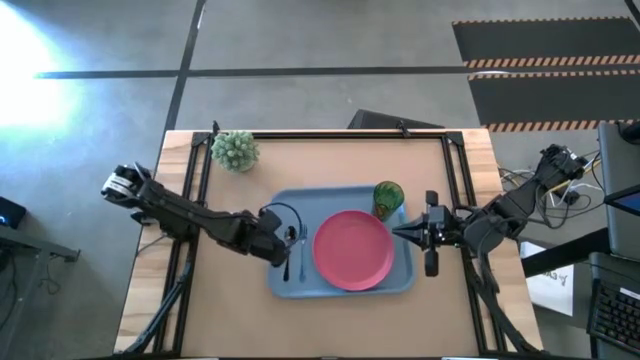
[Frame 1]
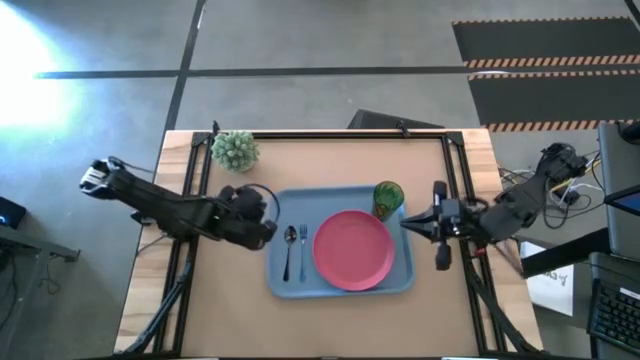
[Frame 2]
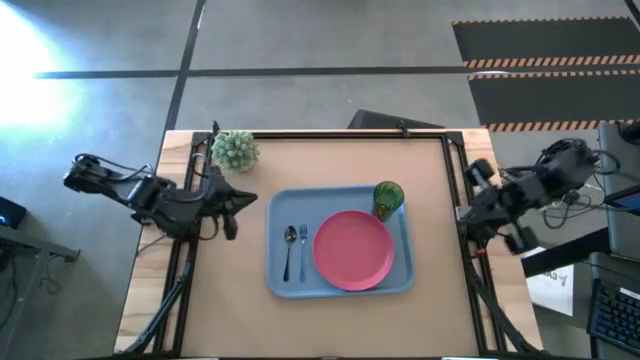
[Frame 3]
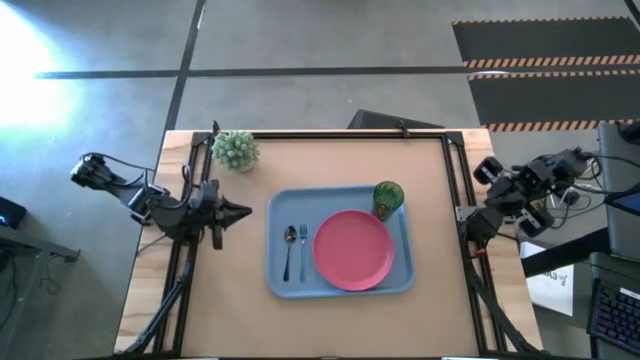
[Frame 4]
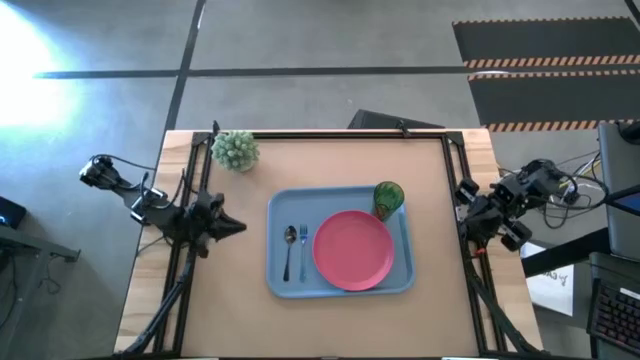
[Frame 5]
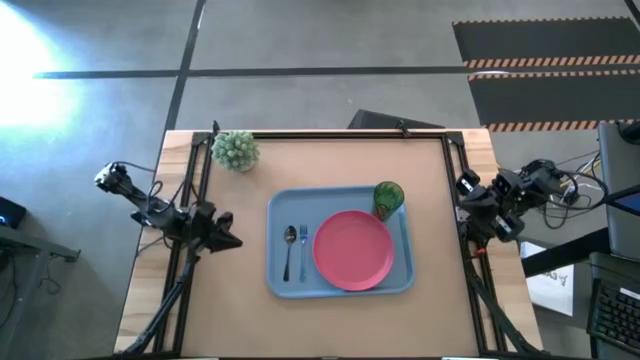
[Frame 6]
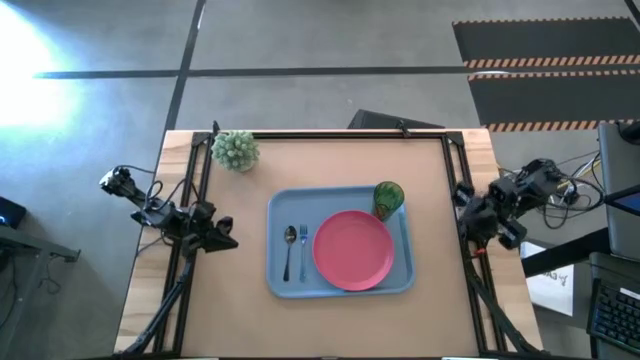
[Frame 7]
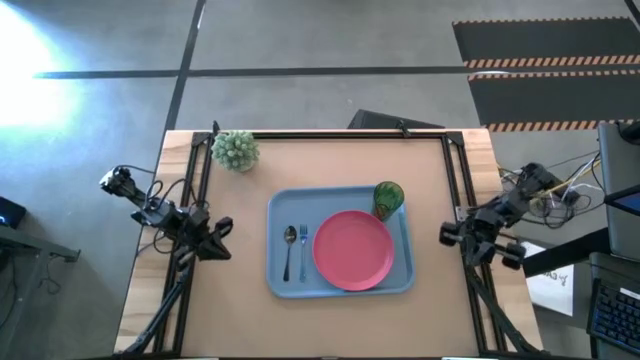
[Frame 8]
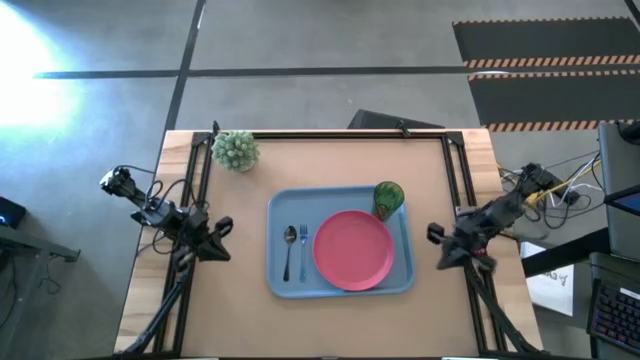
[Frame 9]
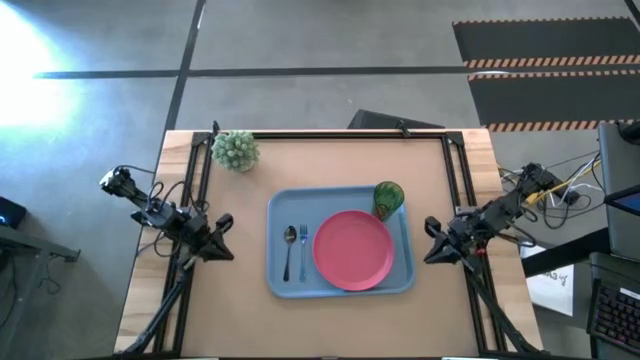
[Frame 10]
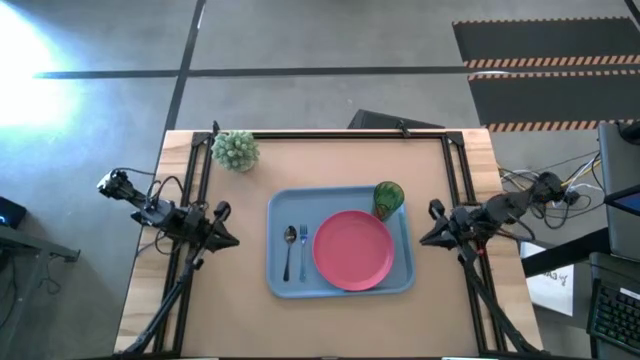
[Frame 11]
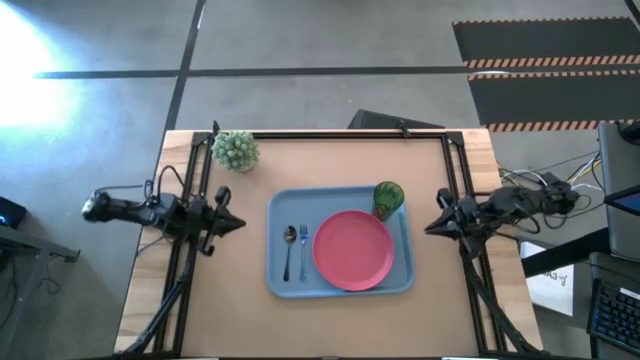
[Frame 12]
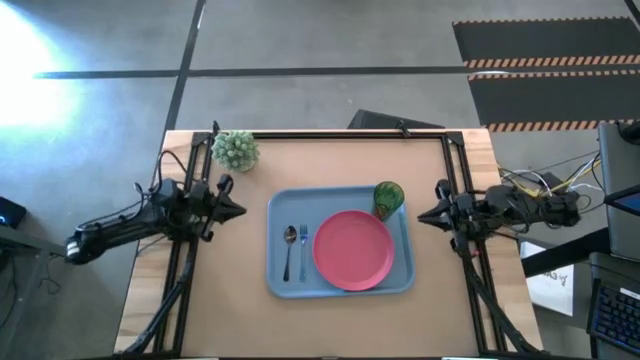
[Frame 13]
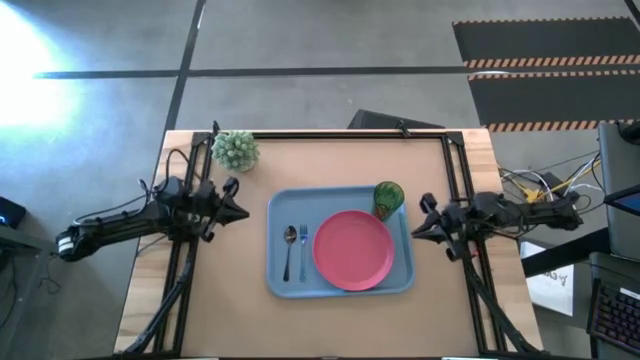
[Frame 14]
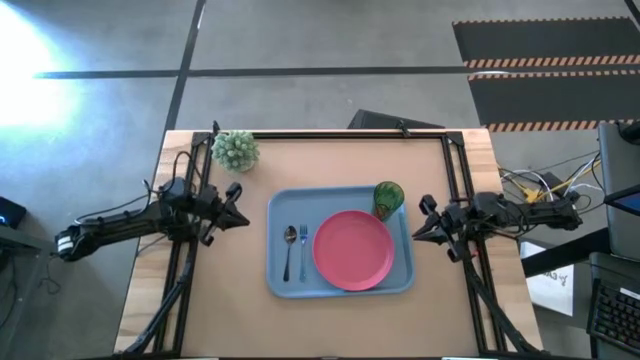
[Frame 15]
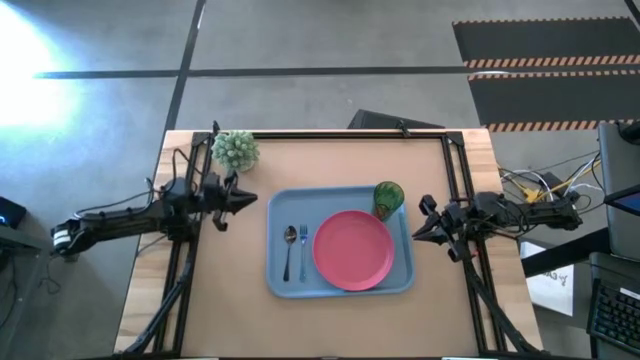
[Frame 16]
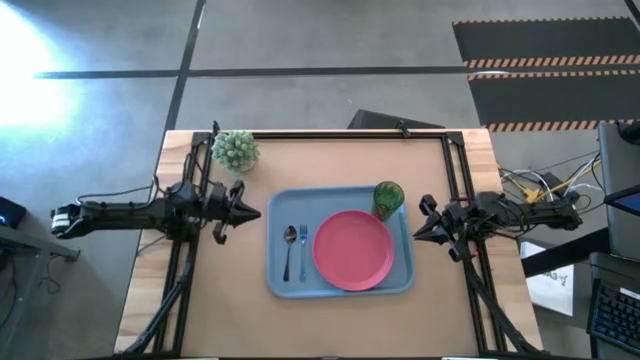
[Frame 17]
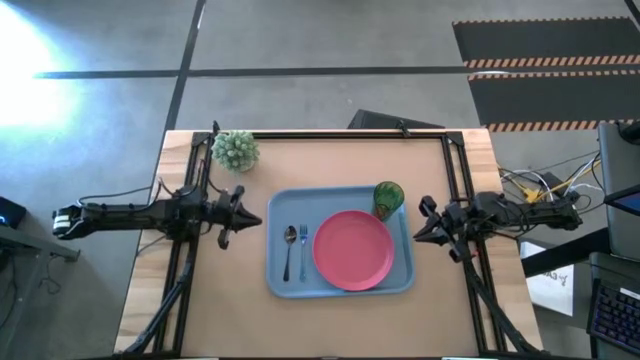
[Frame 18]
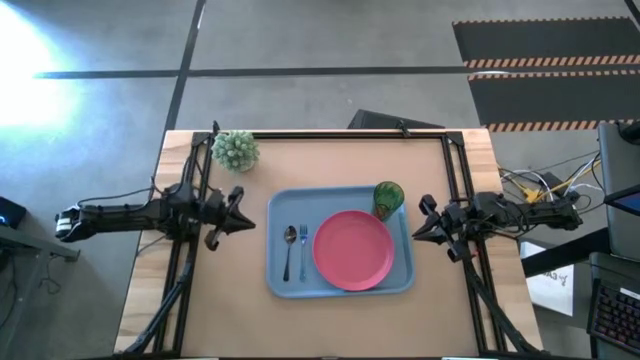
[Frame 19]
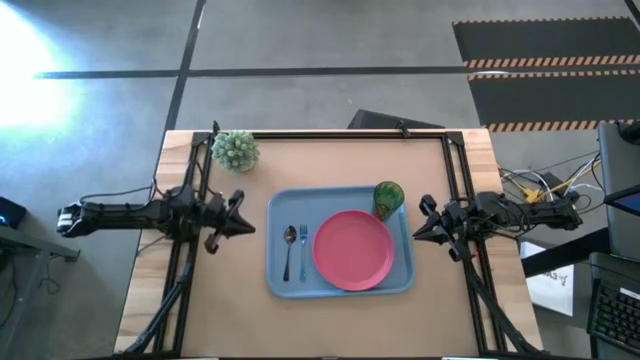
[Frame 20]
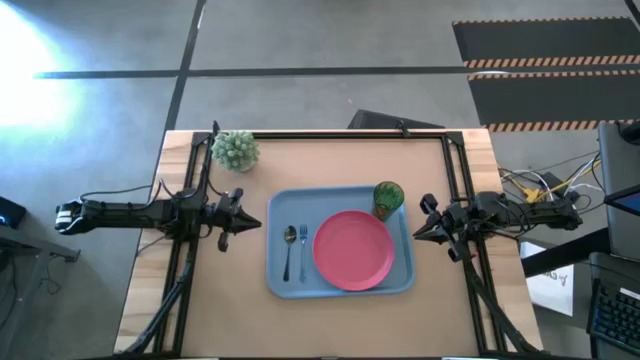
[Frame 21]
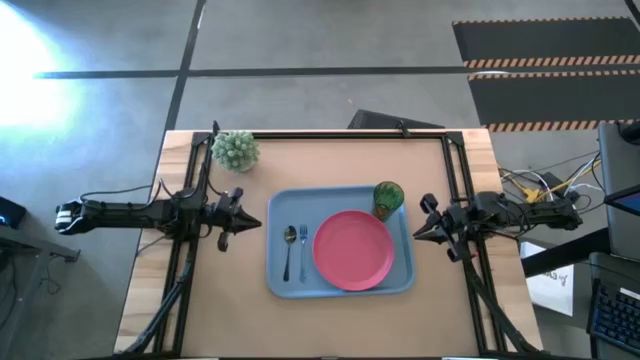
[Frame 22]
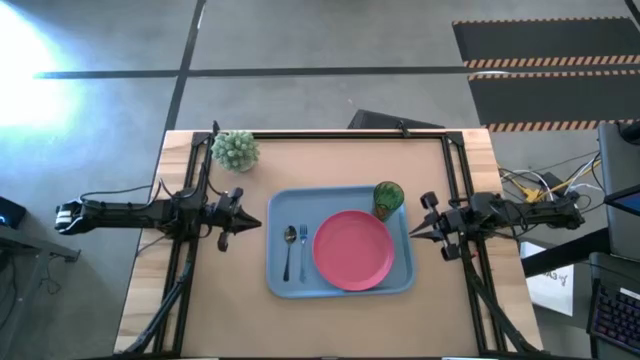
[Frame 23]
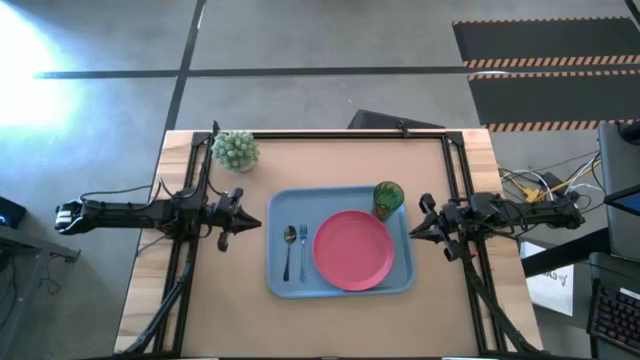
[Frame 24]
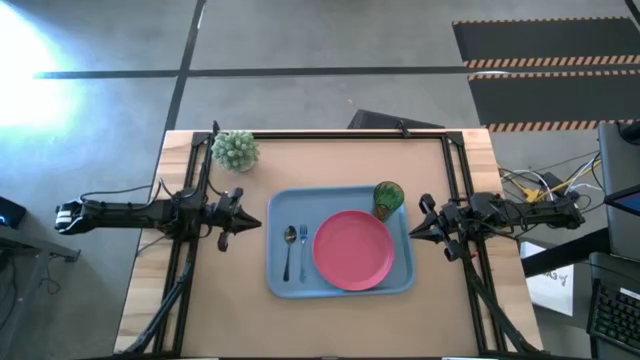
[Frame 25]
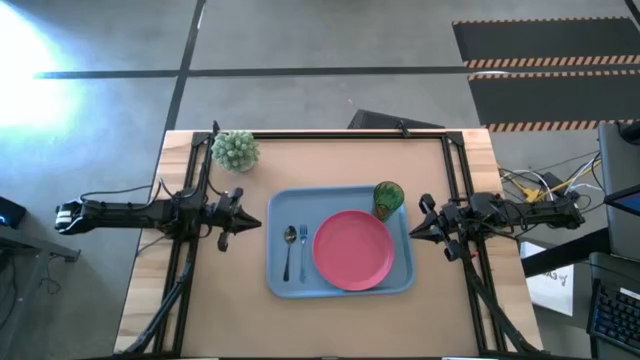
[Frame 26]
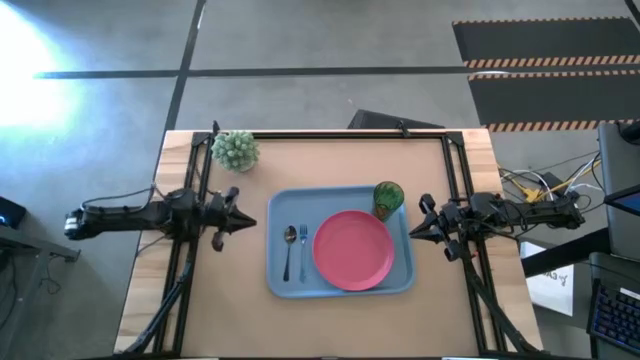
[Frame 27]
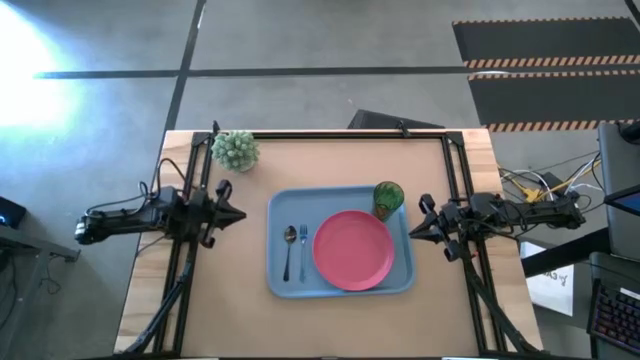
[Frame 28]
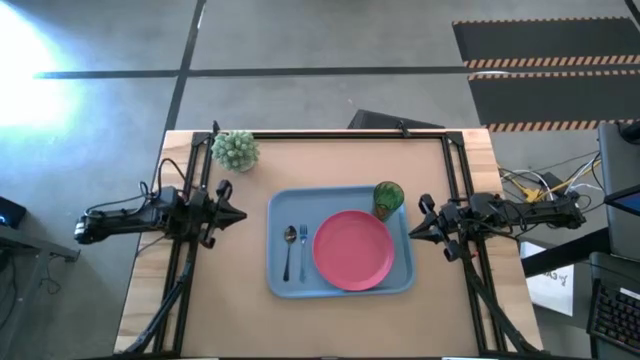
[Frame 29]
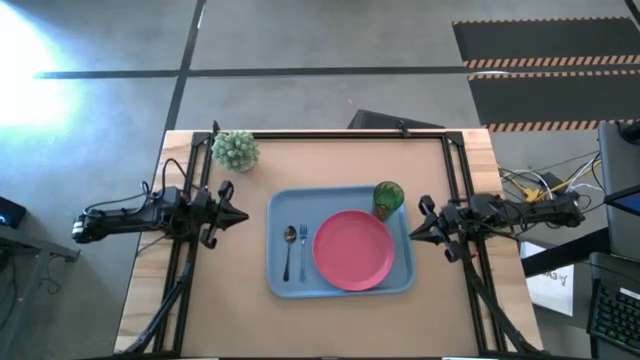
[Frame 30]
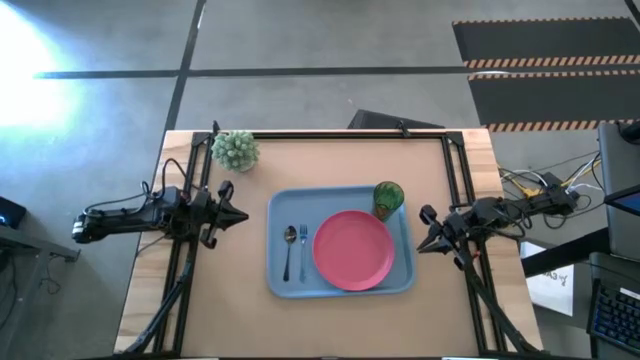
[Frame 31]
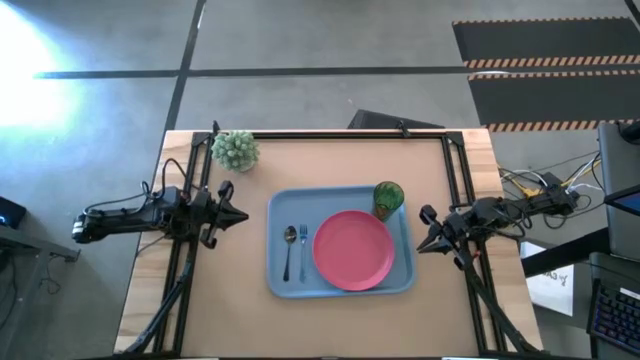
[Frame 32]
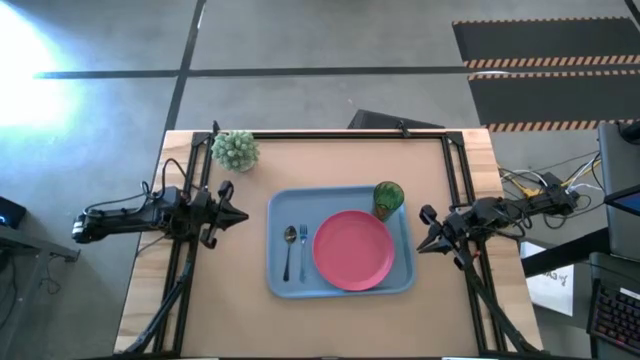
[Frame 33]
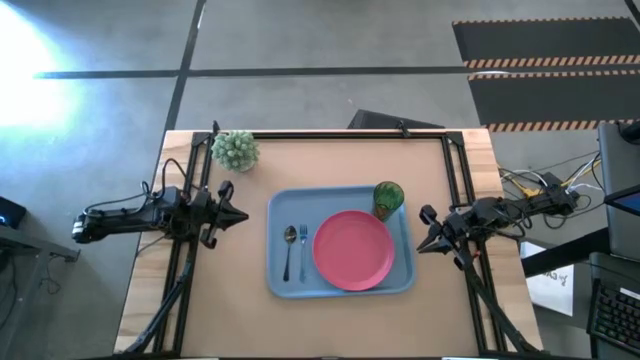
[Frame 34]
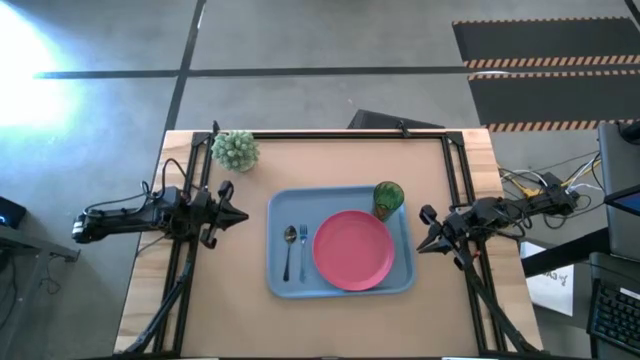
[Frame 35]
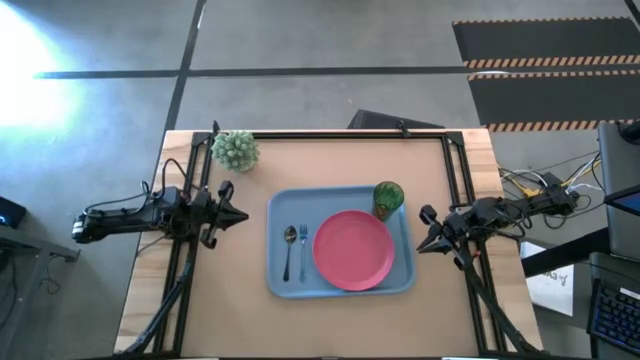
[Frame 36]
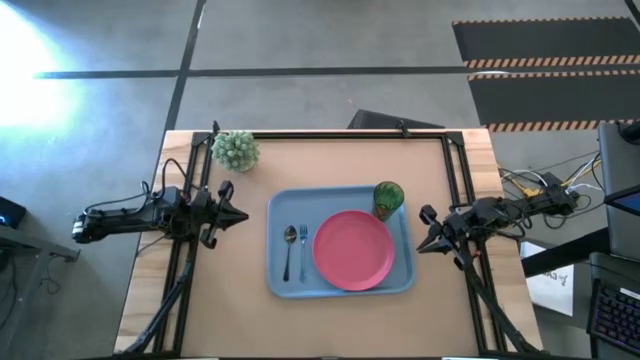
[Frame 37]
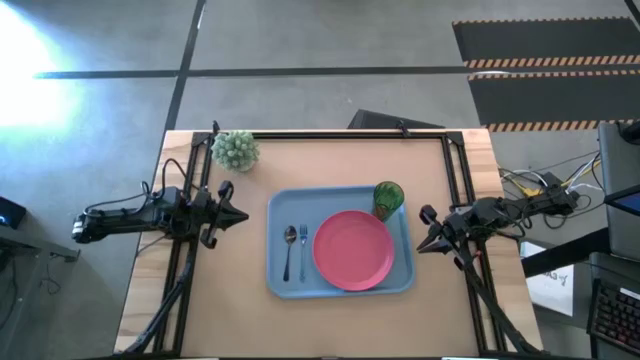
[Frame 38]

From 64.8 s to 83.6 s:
Task: Pick and place plate/cup/fork/spoon on tray
Return to Home Position

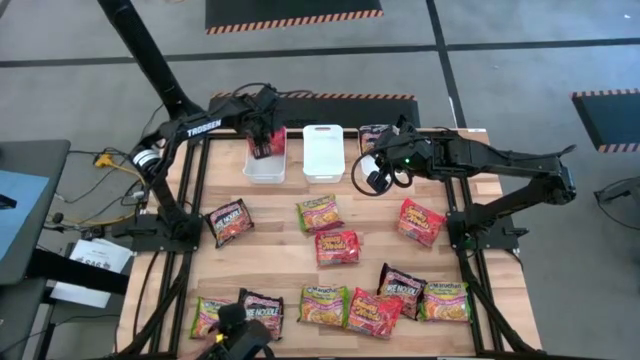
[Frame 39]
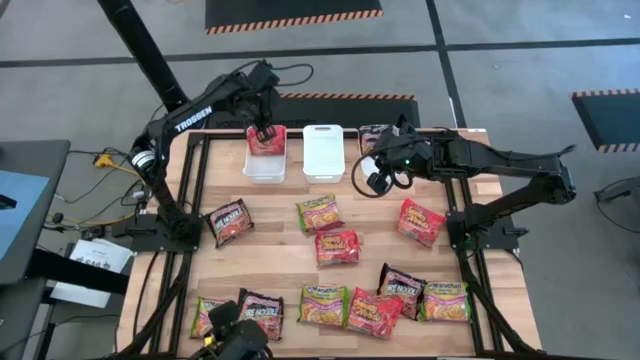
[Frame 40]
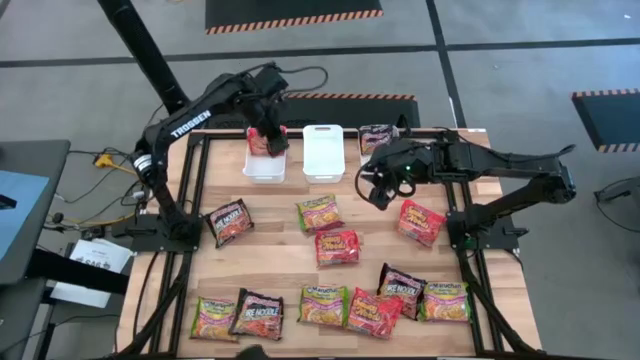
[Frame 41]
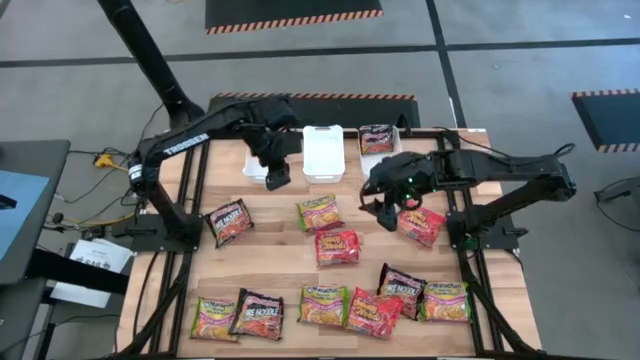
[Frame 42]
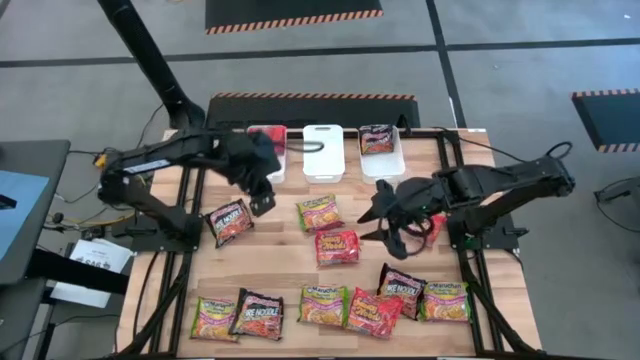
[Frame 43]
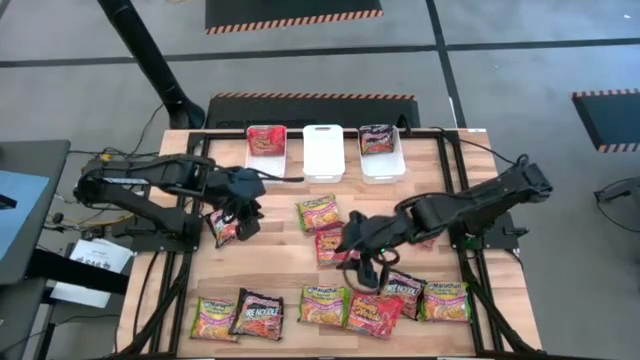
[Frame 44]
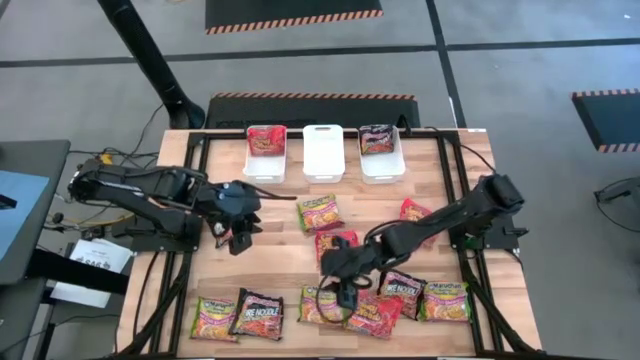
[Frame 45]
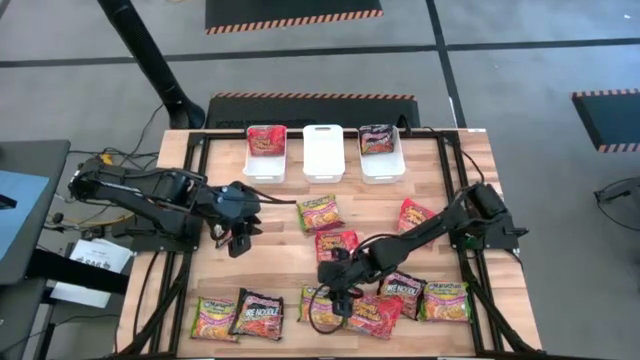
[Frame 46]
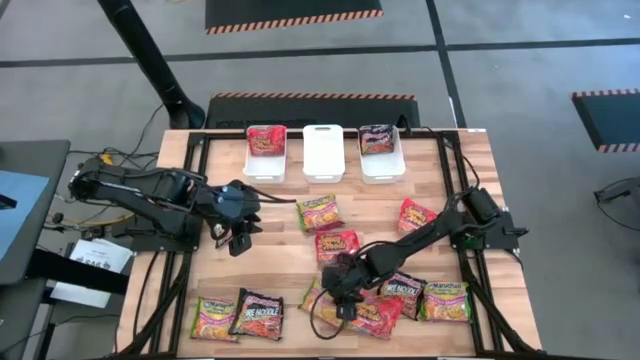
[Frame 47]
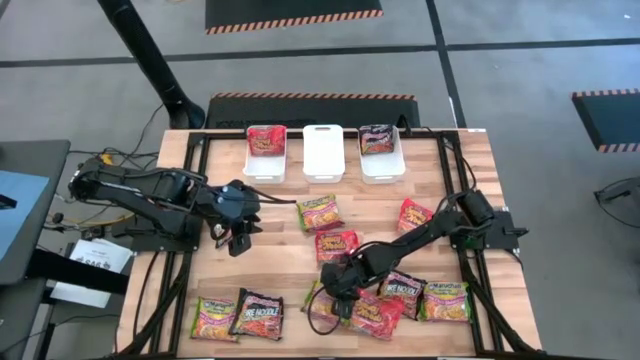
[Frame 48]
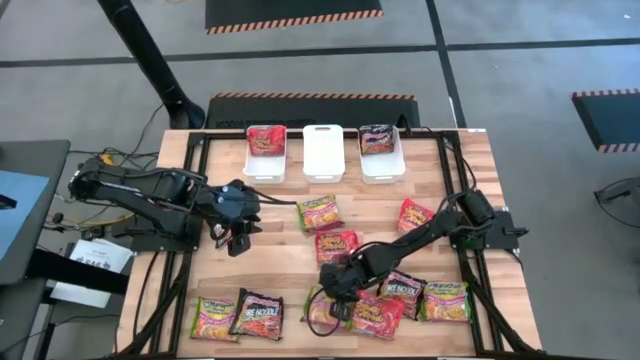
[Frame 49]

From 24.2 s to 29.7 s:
Task: Sort Maruchan noodles
Put the green noodle pack into the middle white bin
